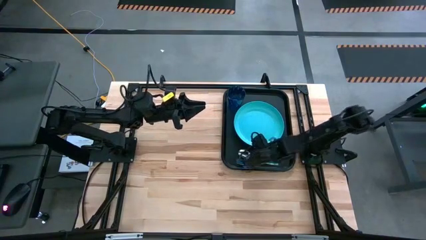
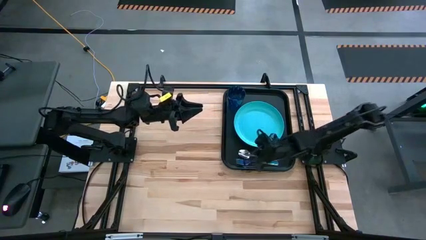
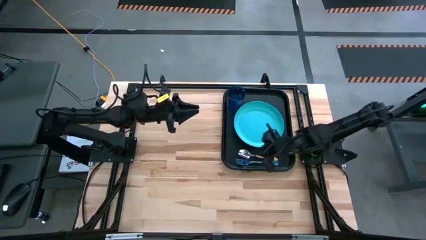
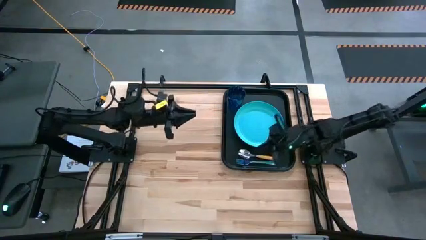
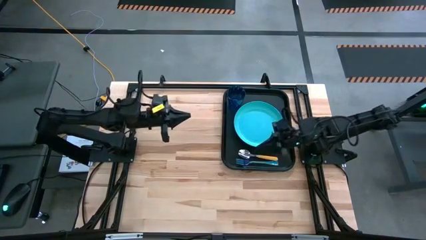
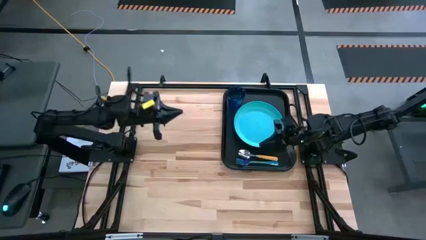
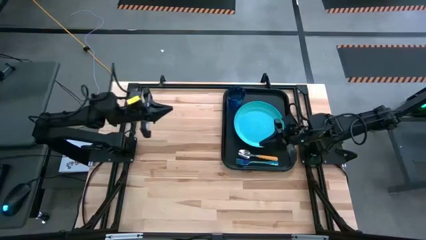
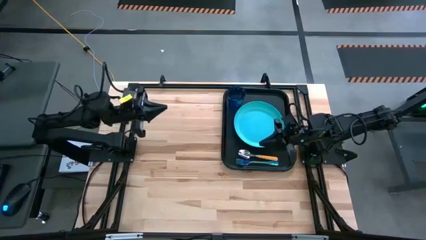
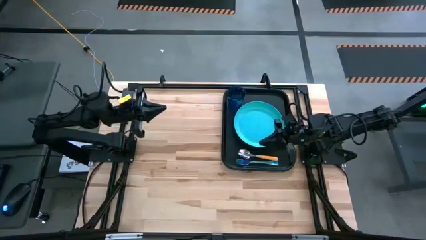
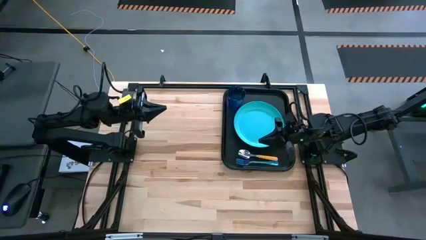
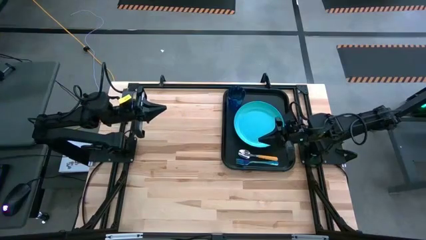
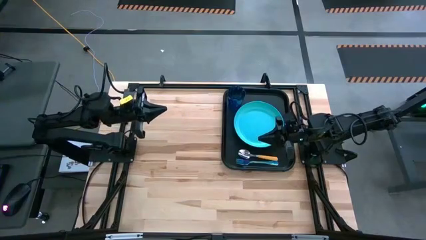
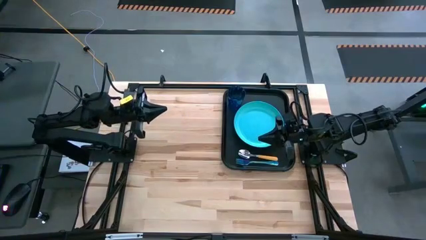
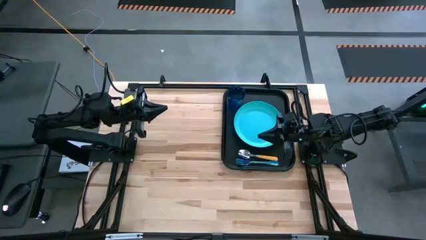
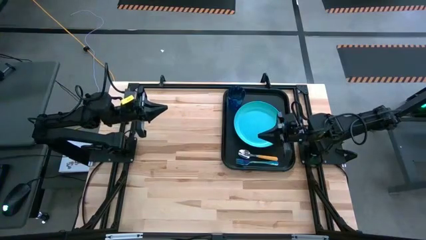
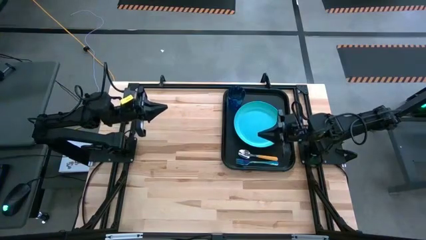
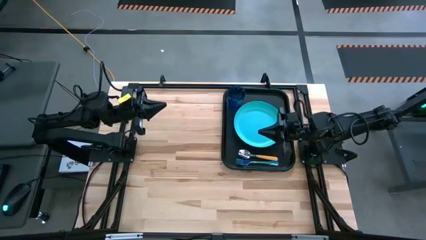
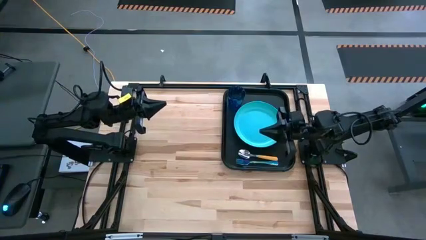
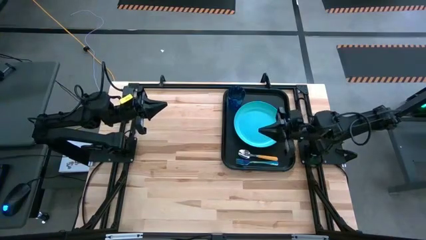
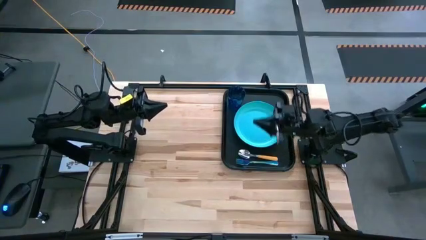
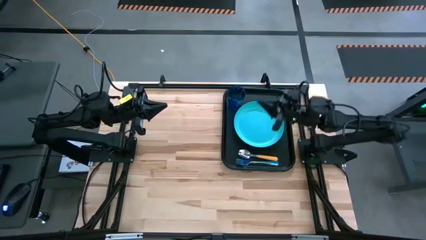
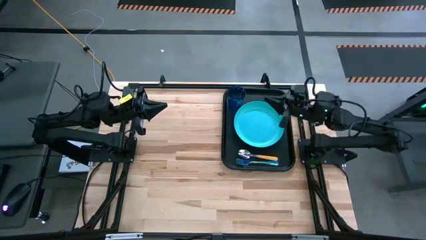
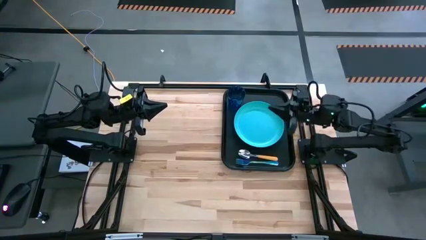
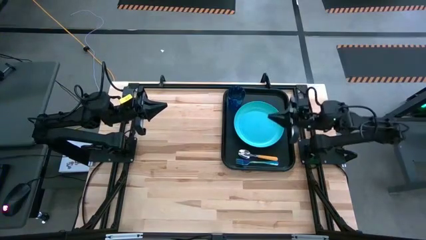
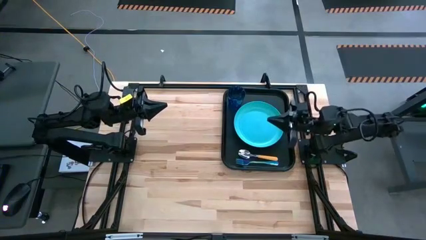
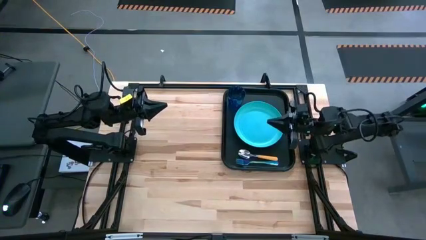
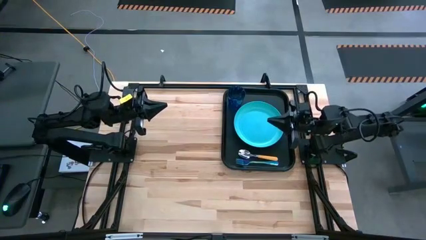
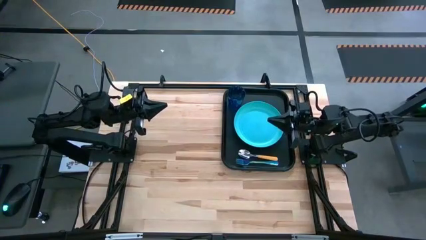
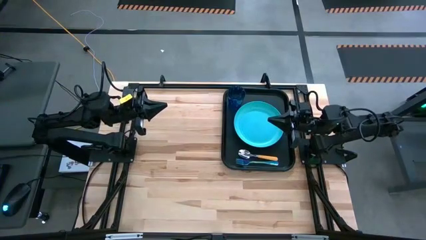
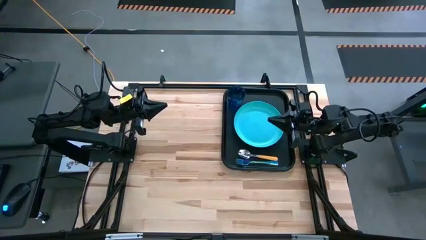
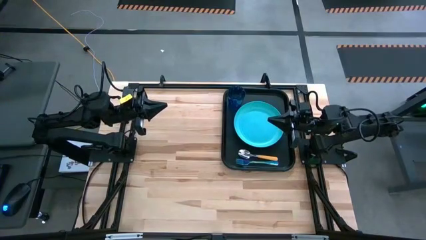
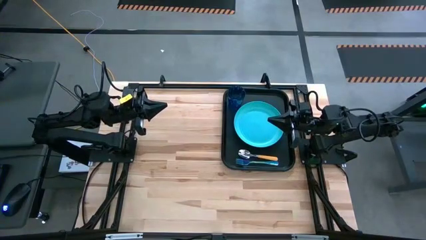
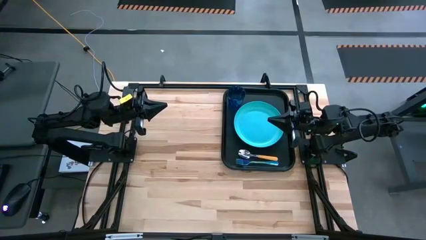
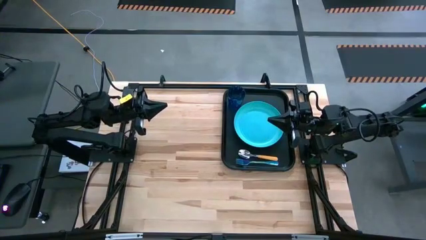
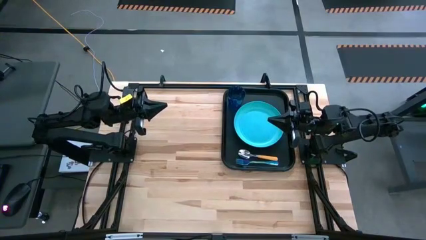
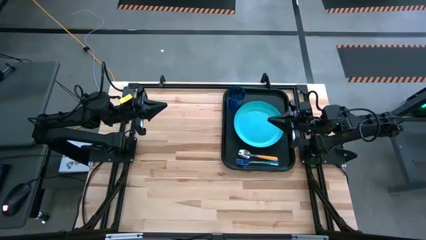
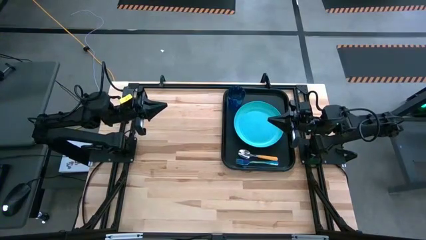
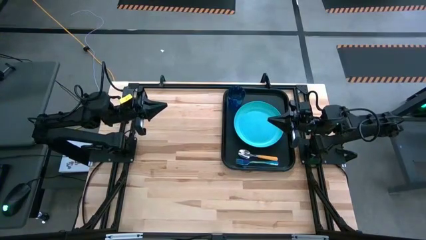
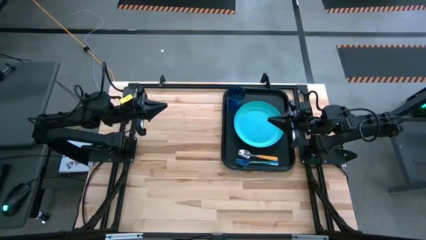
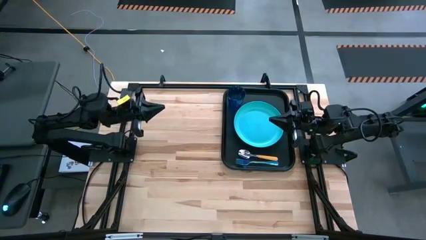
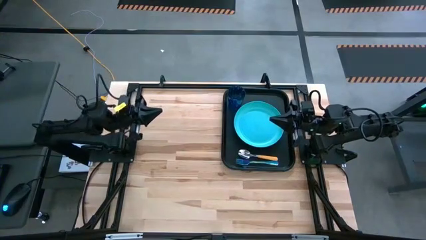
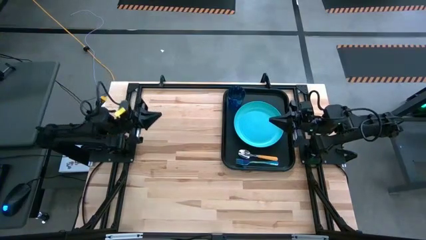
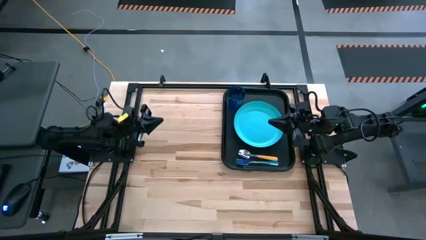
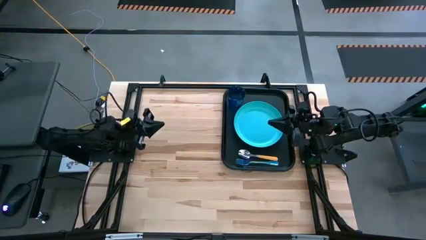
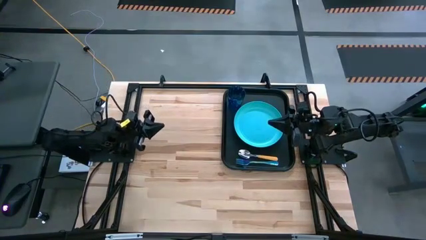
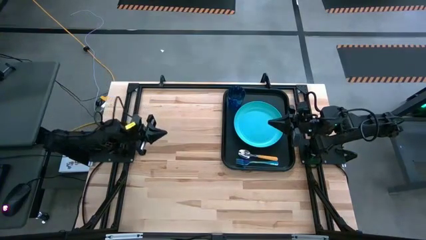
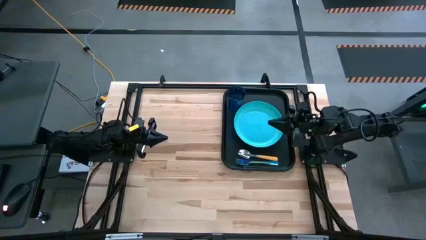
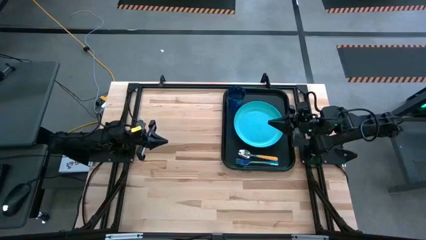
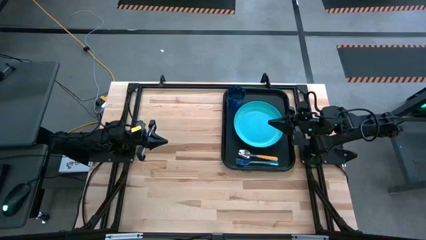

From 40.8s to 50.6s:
Task: Pick and place plate/cup/fork/spoon on tray
Return to Home Position

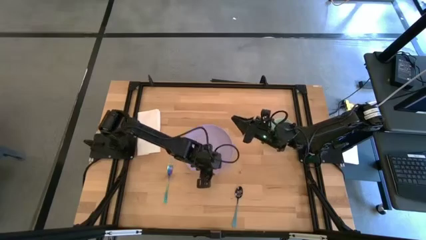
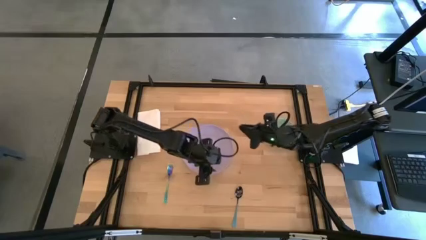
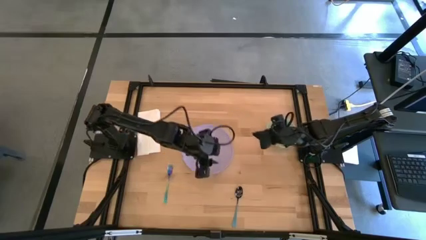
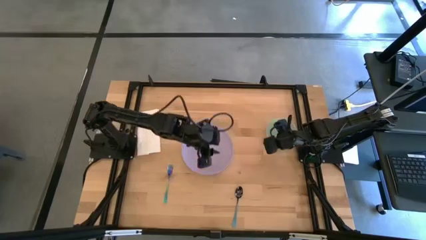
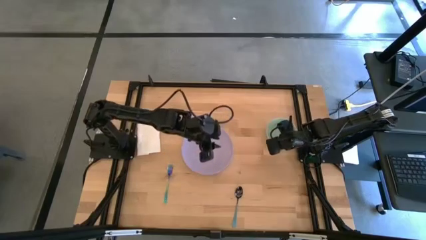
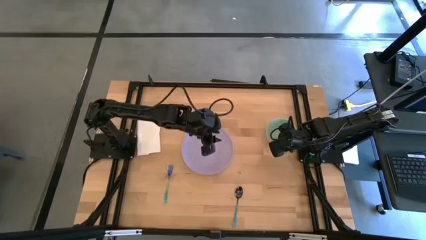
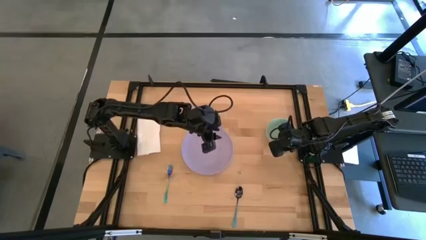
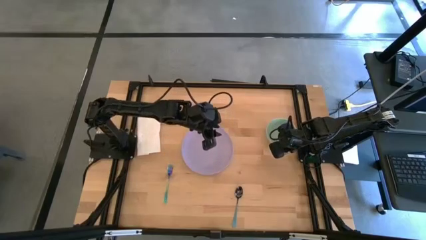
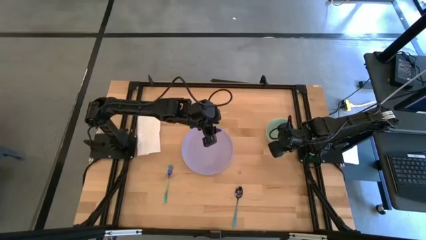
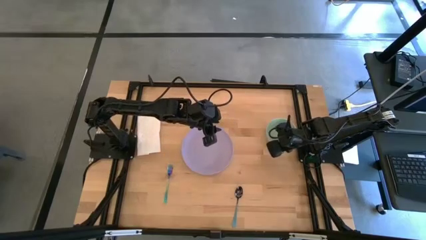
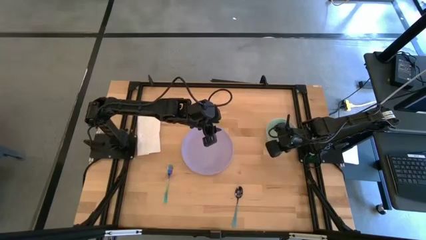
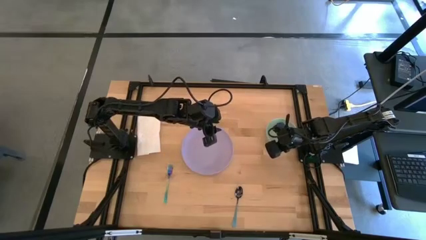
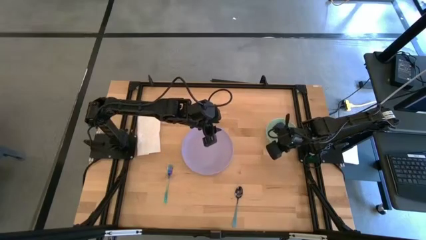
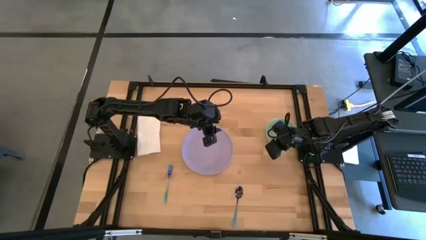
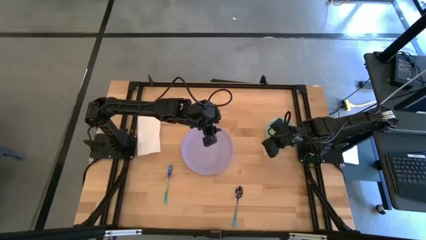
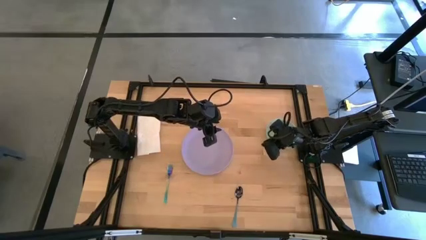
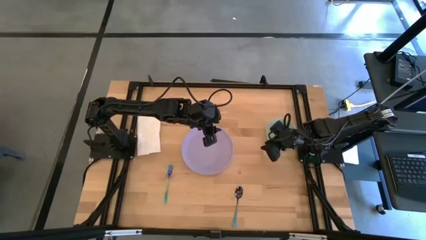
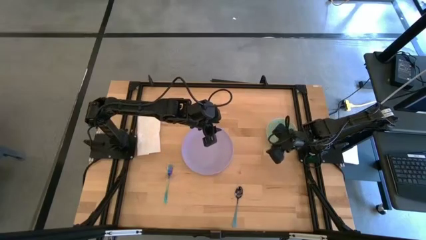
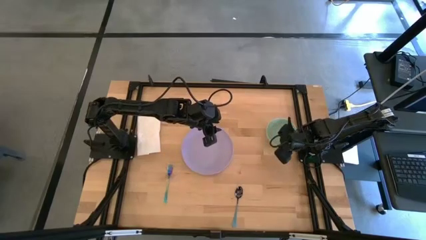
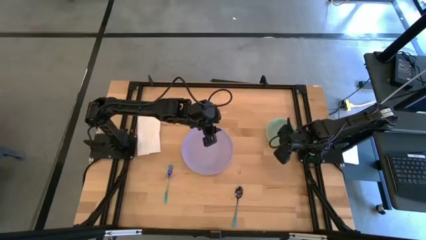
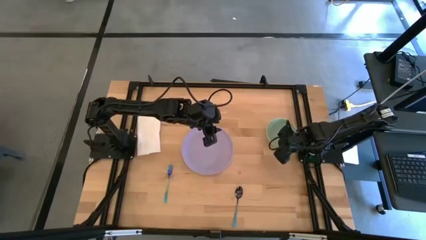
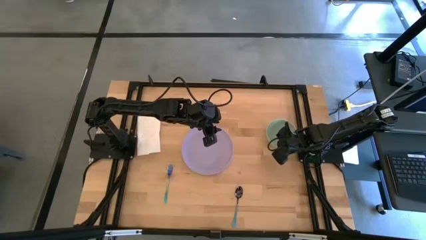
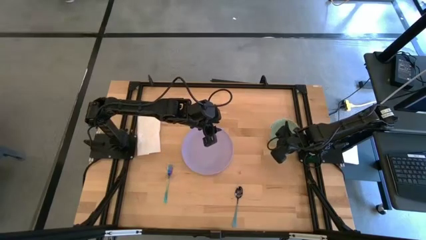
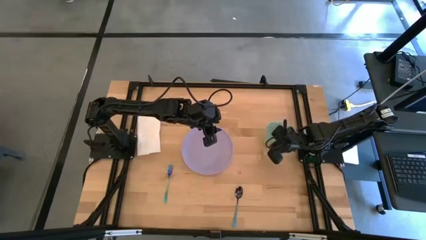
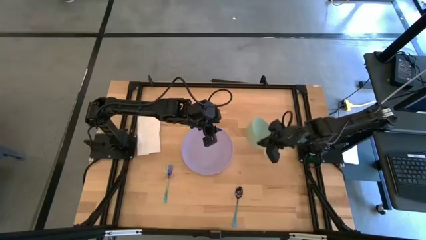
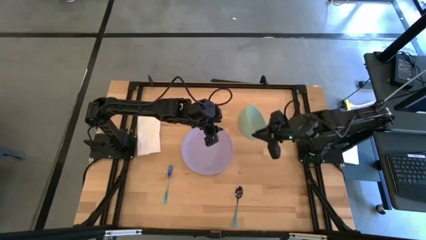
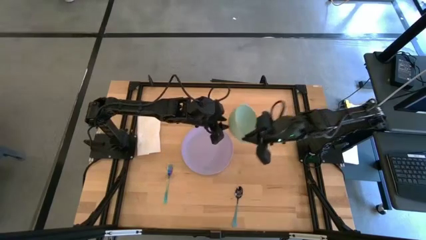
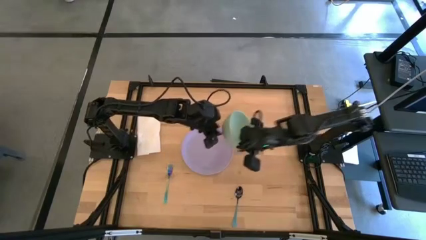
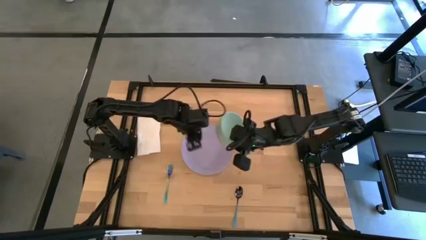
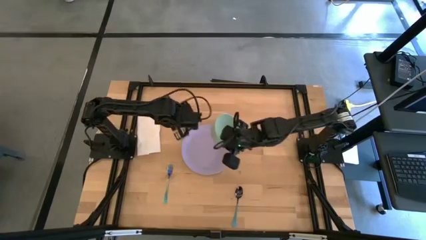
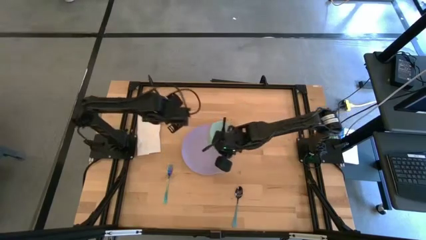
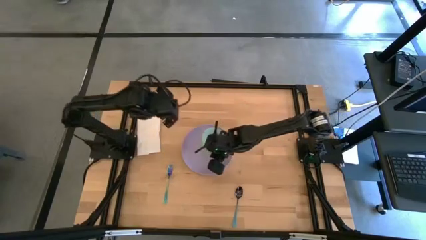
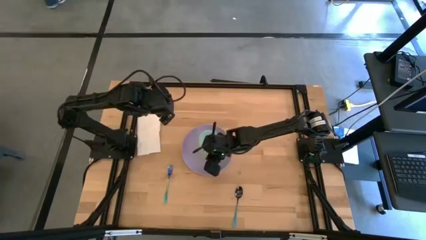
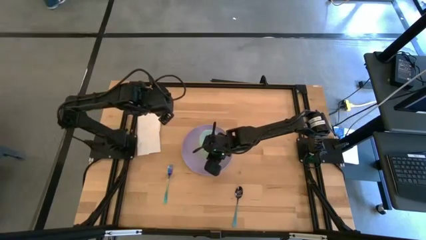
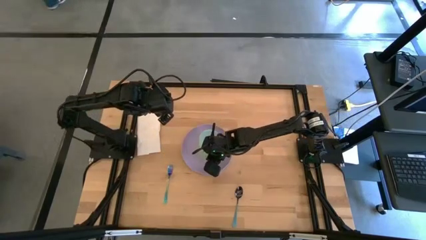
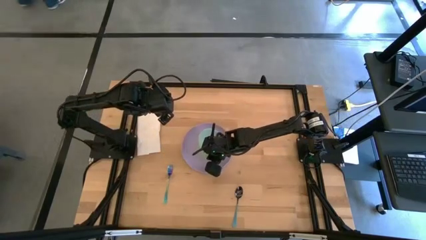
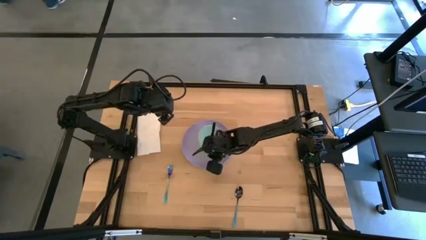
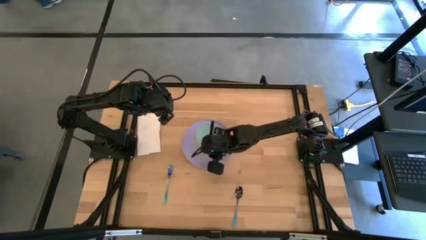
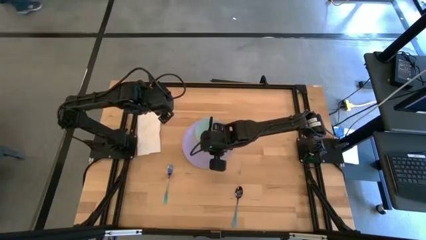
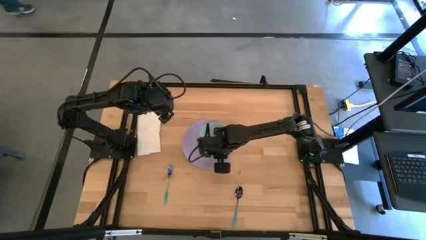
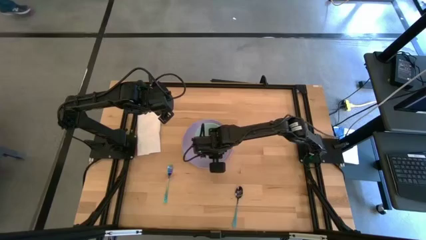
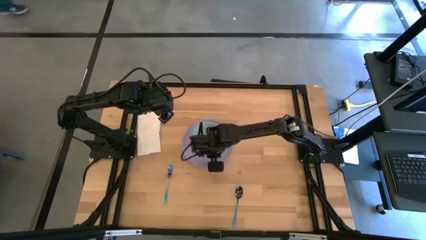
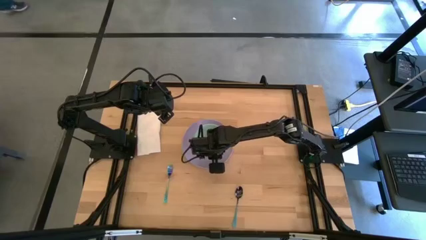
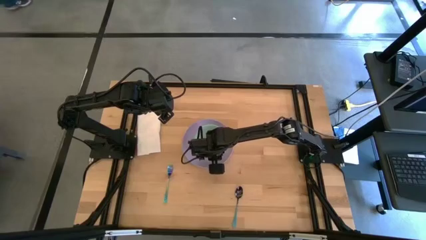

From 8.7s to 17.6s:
Task: Set table place
Put the light green bowl on top of the purple plate
